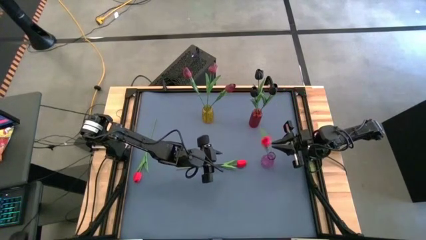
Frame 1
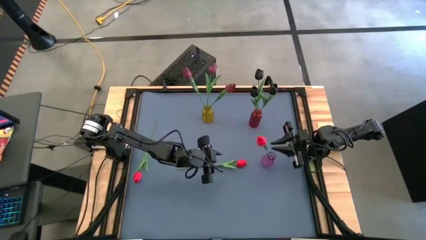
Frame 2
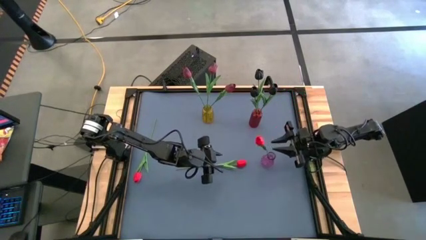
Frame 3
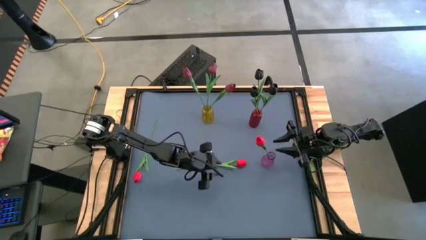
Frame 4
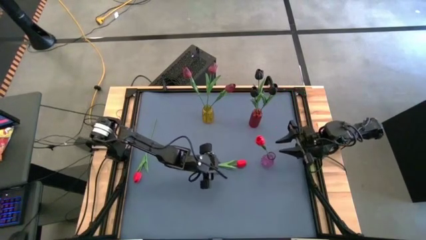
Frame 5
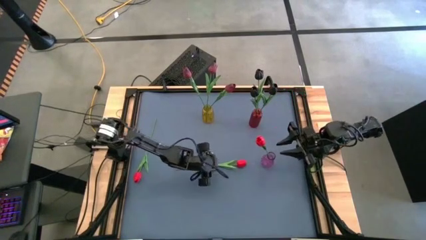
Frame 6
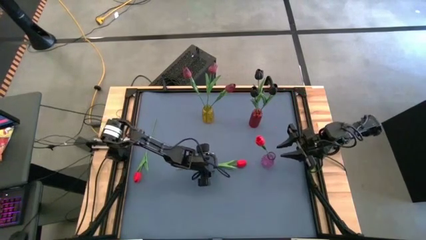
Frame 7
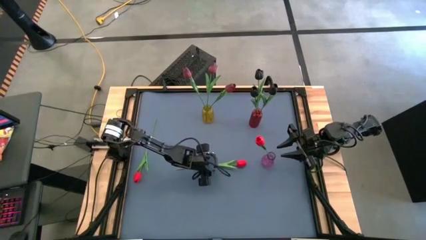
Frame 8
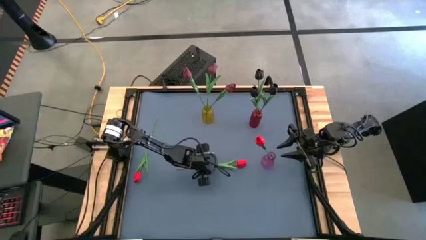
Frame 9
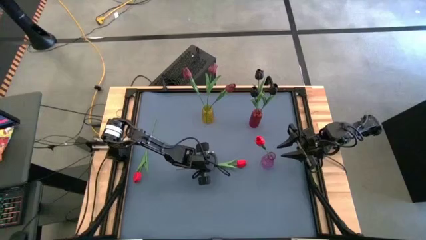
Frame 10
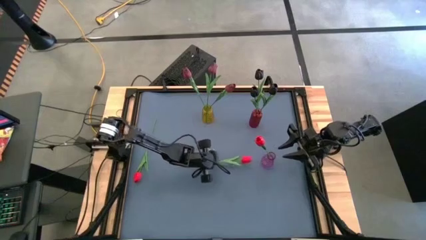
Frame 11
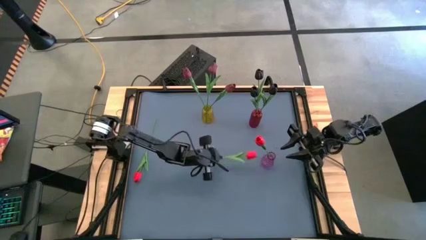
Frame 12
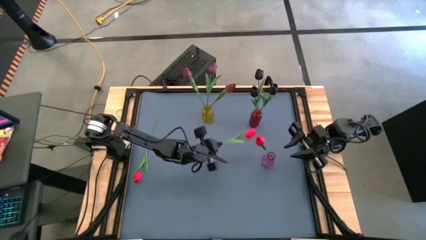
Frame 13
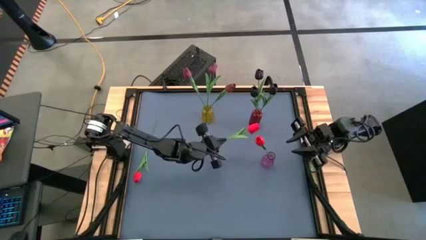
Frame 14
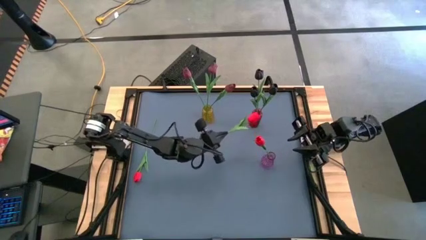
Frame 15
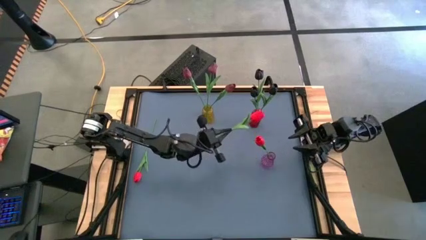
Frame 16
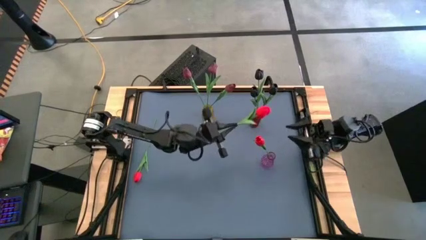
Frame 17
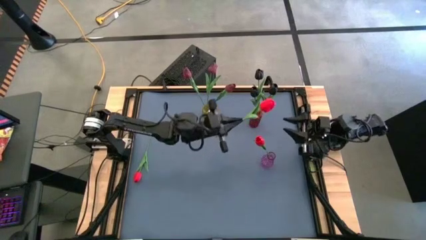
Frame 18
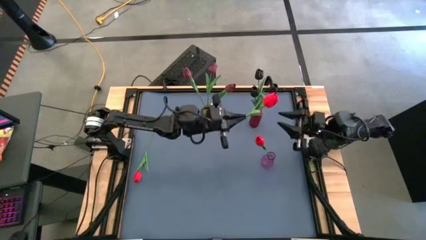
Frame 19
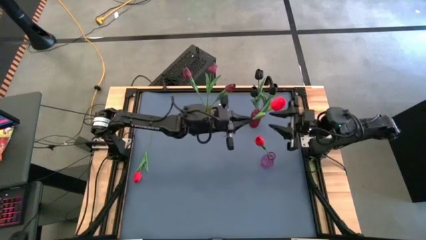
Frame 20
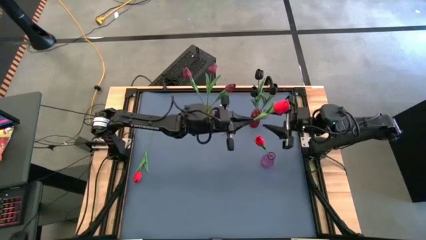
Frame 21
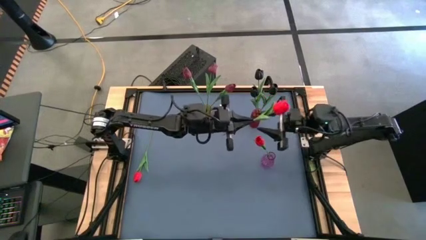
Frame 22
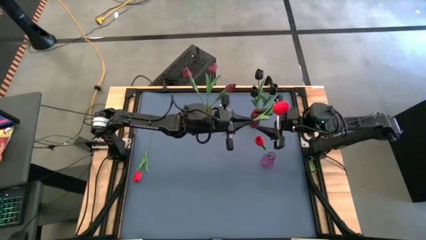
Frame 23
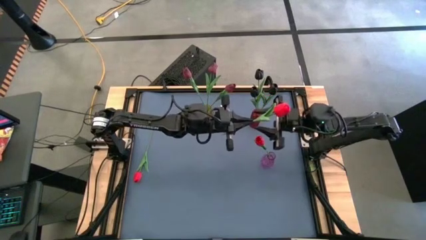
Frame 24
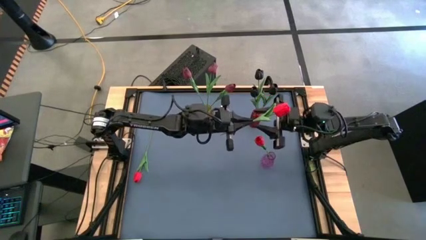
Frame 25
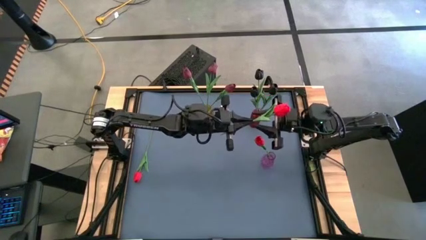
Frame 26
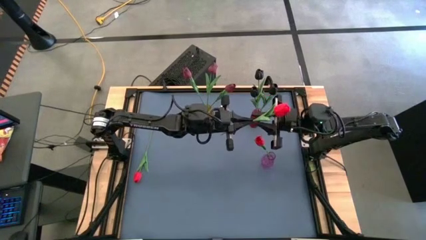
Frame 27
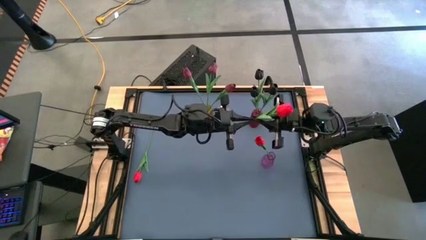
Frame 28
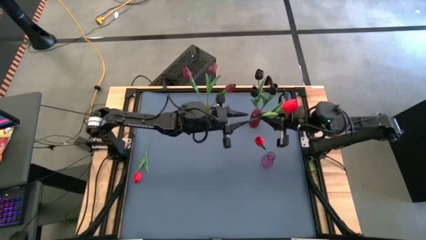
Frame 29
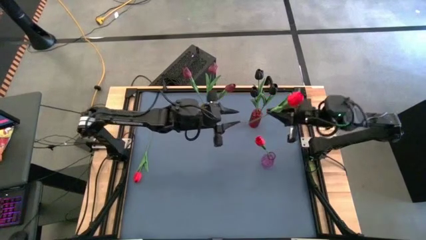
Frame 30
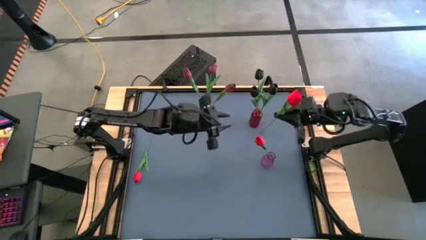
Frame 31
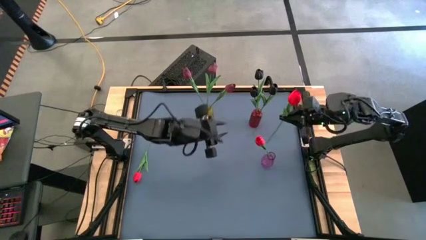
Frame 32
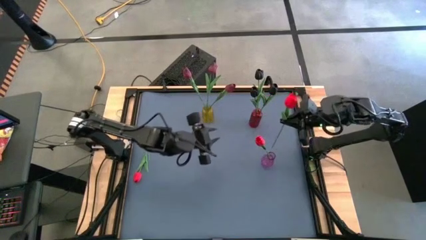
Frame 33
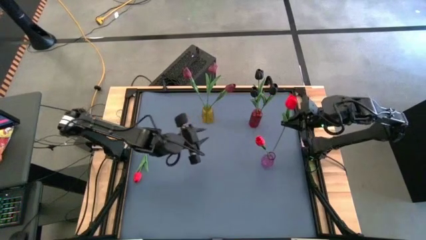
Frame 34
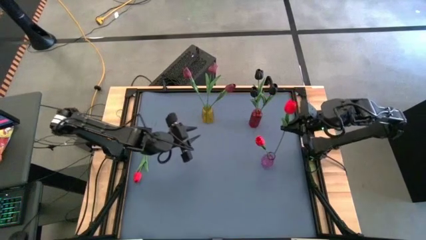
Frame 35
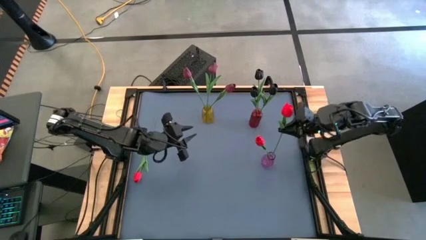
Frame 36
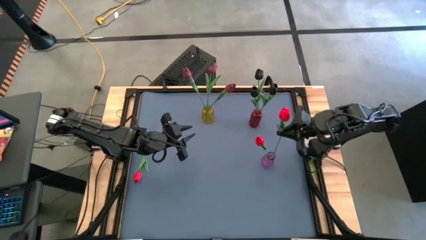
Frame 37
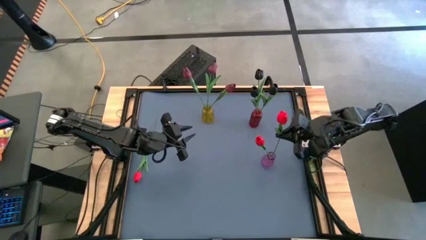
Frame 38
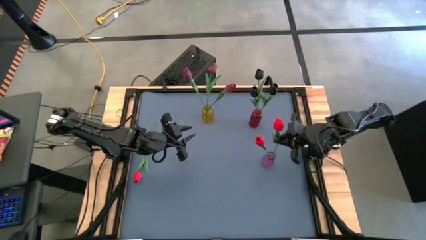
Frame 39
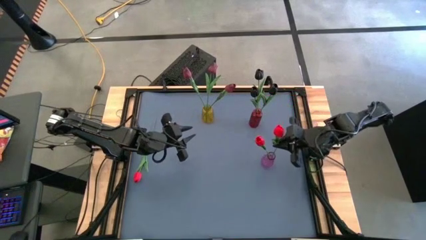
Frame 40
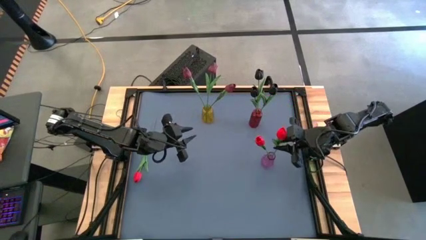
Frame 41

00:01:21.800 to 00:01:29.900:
Task: Sort flowers into vase by color
Put the right red flower into the purple vase

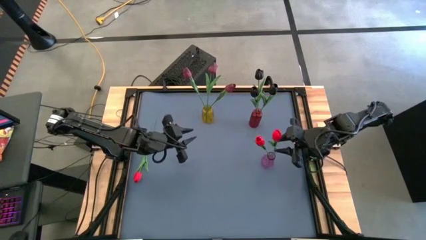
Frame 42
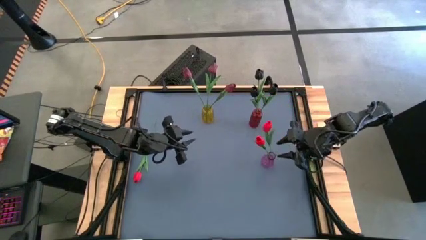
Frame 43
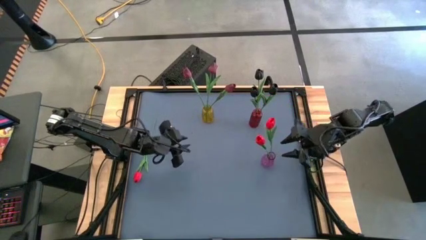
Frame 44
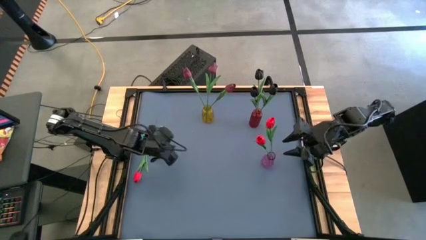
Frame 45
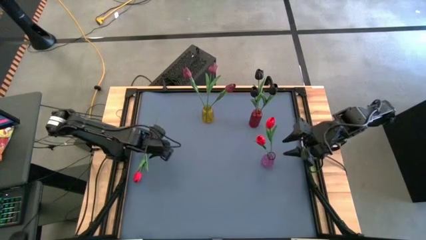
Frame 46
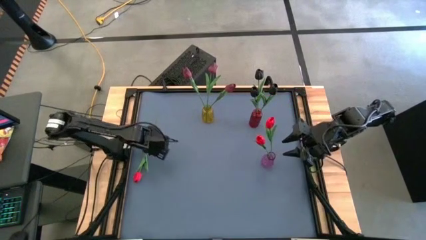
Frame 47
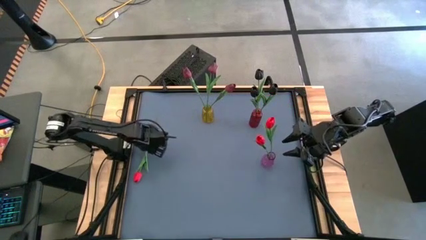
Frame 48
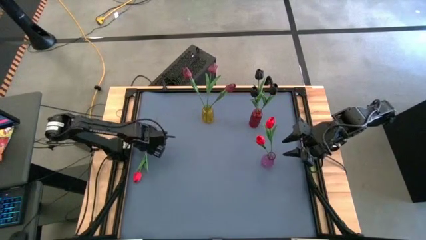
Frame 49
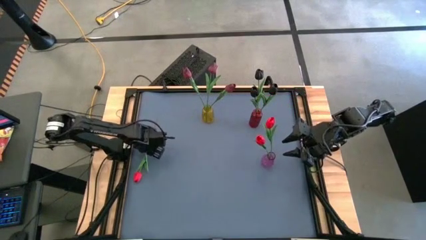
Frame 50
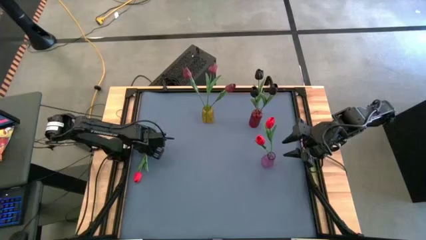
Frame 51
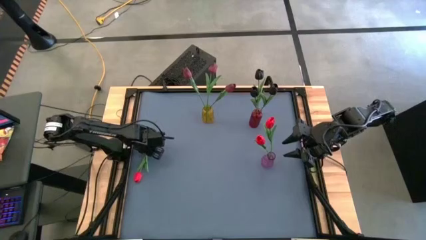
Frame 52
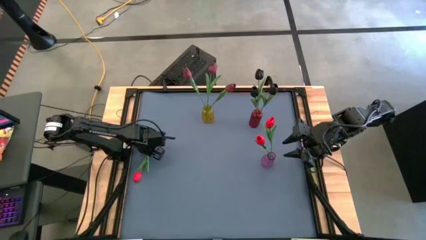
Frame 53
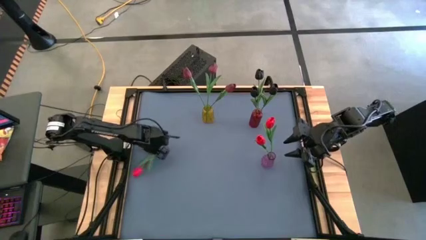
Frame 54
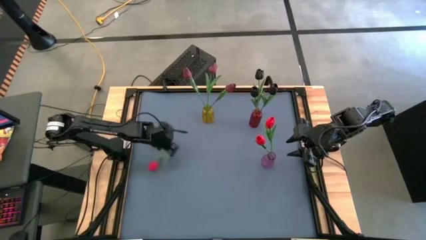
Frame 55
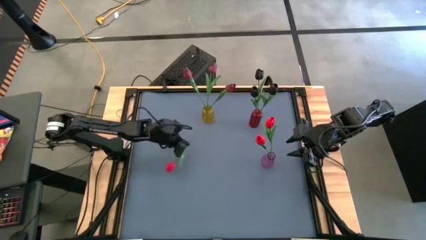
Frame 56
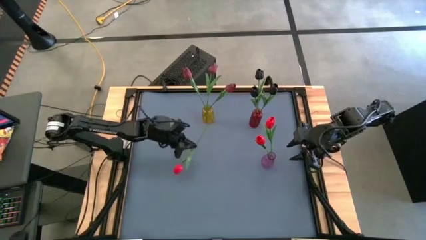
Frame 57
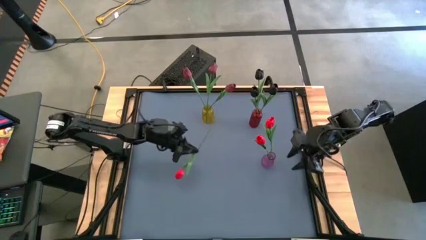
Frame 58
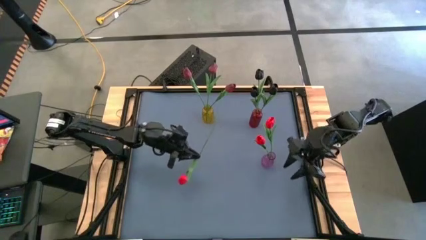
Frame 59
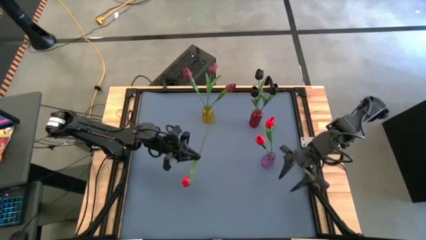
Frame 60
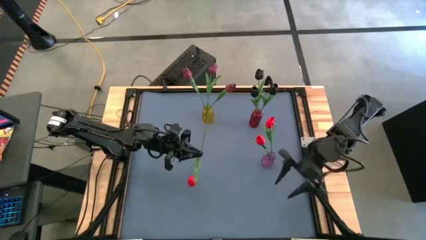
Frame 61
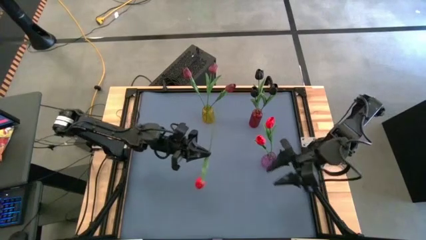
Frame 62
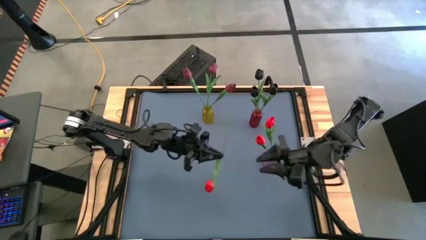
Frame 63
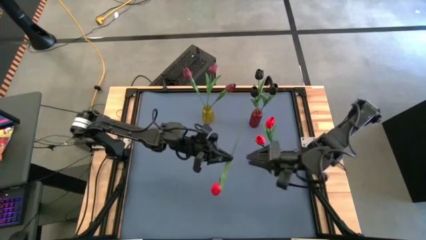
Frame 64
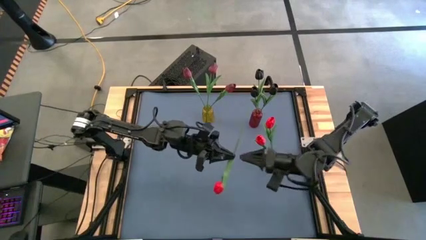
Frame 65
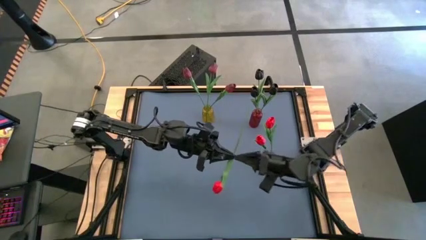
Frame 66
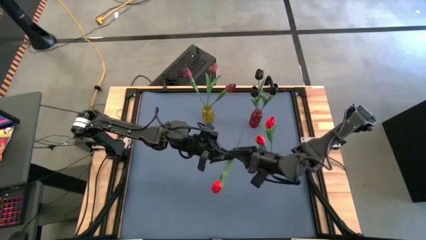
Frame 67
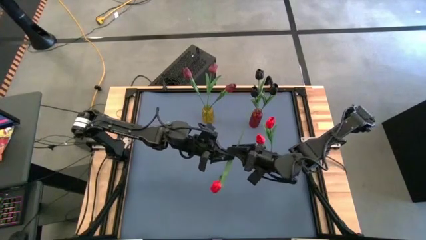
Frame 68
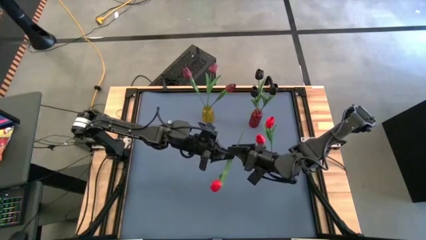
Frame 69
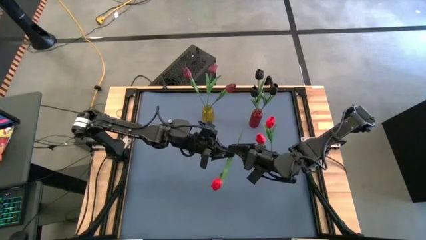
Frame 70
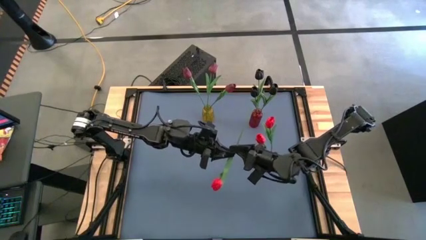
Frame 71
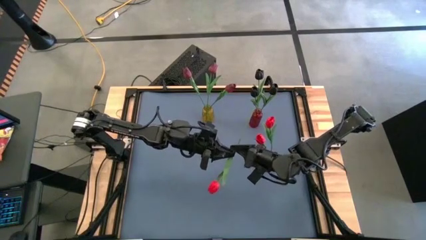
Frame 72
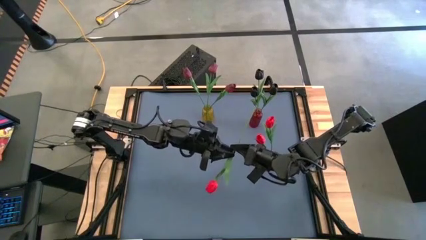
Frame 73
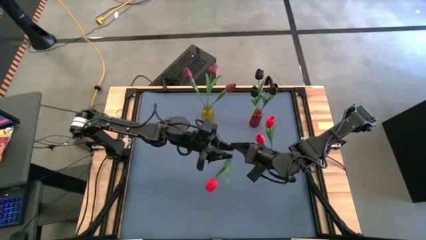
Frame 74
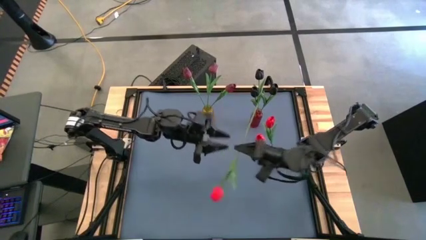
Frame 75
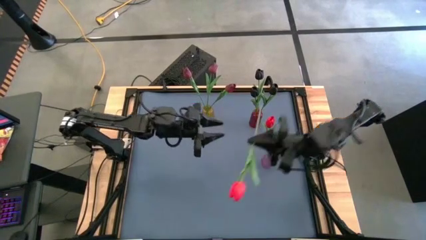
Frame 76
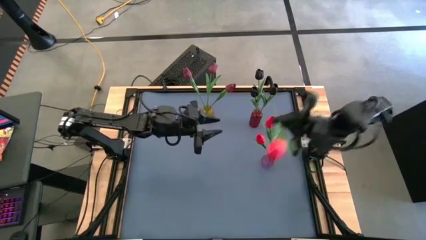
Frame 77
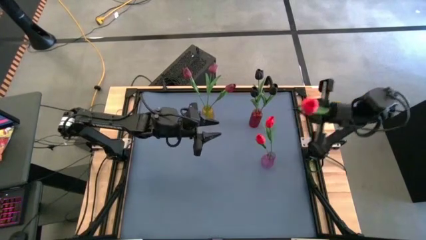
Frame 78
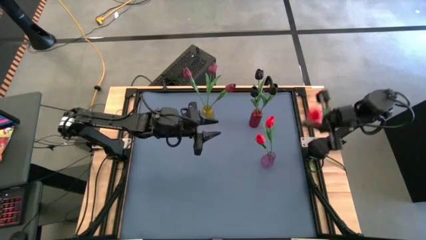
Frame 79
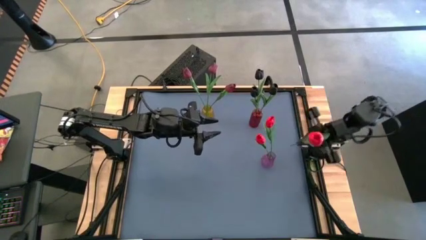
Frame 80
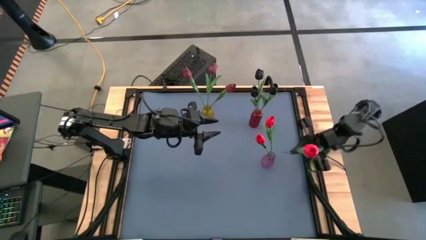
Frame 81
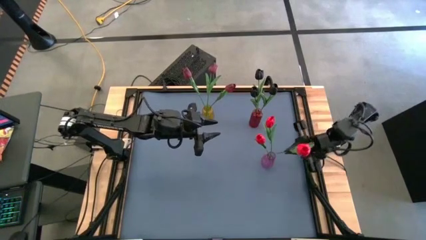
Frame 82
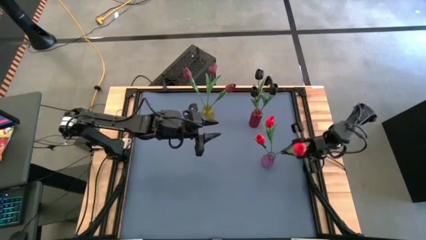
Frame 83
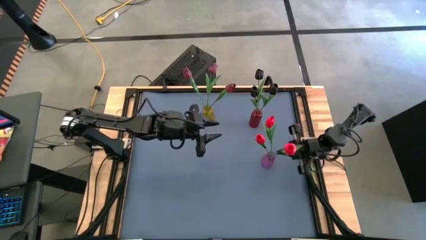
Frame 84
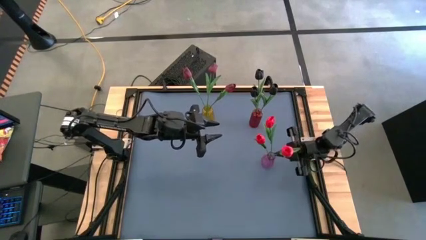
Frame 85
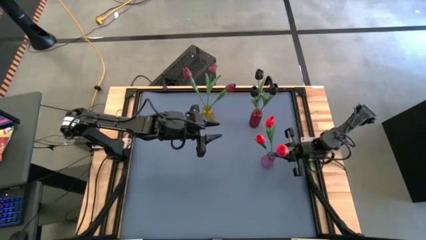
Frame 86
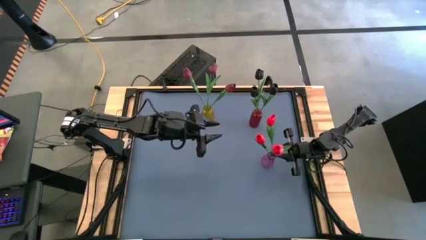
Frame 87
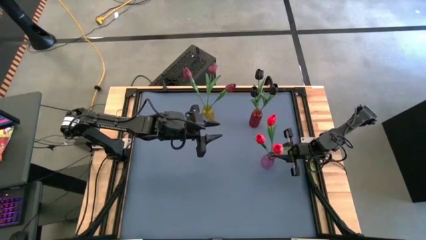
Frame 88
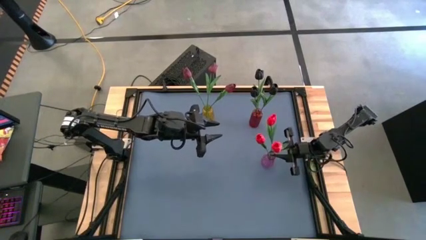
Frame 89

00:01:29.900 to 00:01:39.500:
Put the red flower into the purple vase
